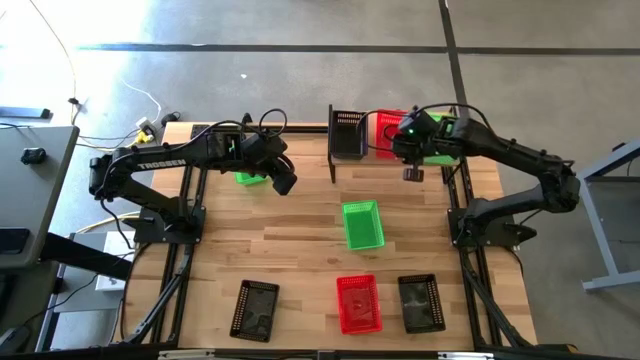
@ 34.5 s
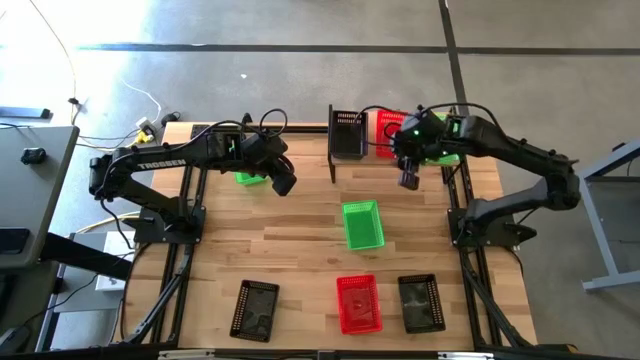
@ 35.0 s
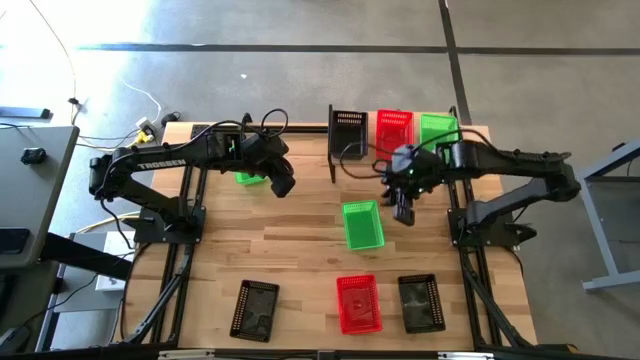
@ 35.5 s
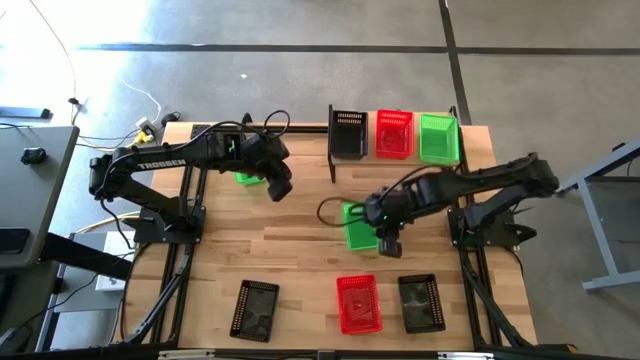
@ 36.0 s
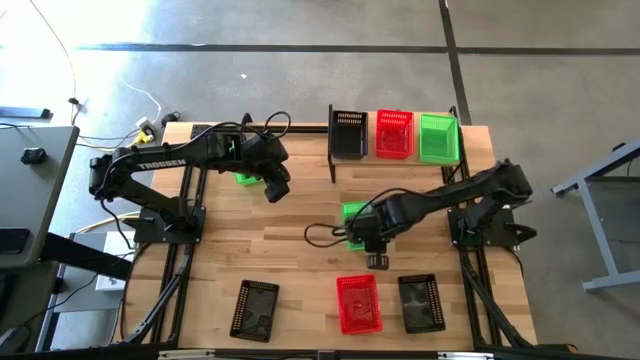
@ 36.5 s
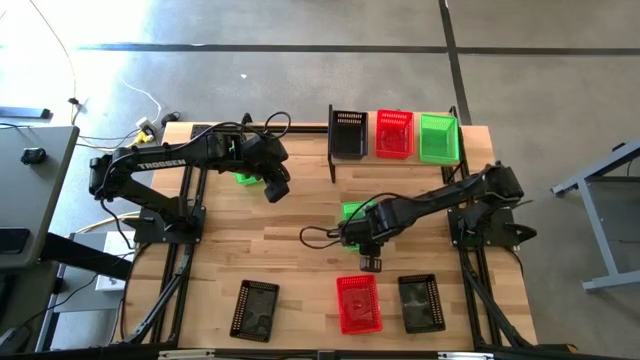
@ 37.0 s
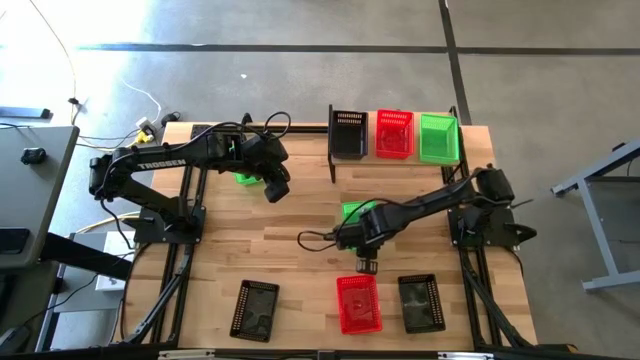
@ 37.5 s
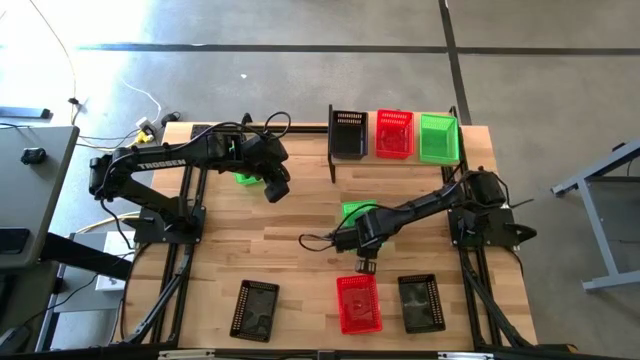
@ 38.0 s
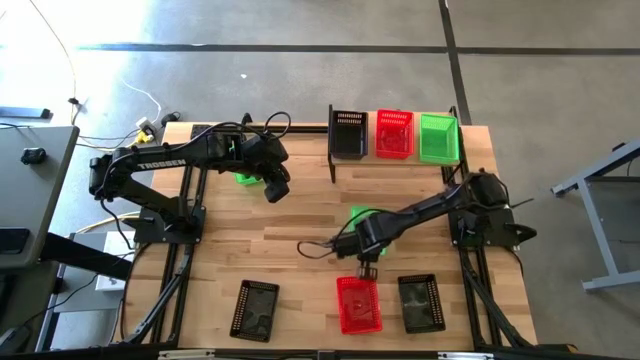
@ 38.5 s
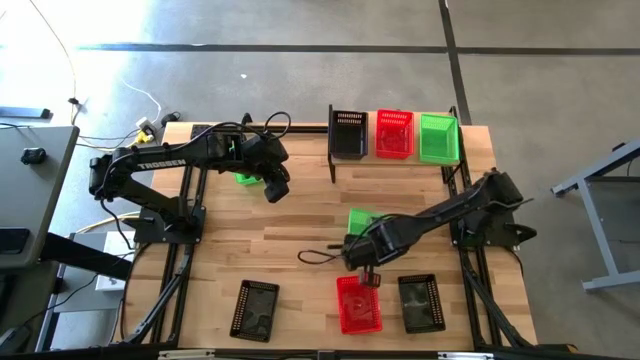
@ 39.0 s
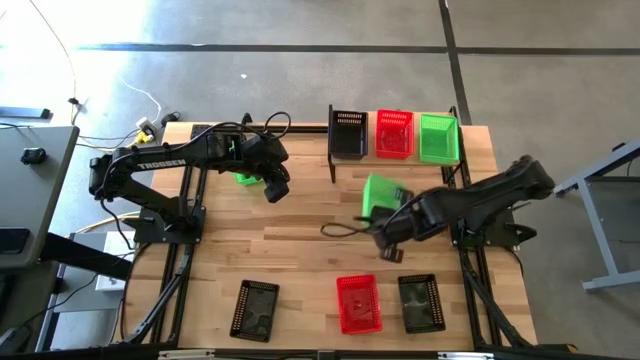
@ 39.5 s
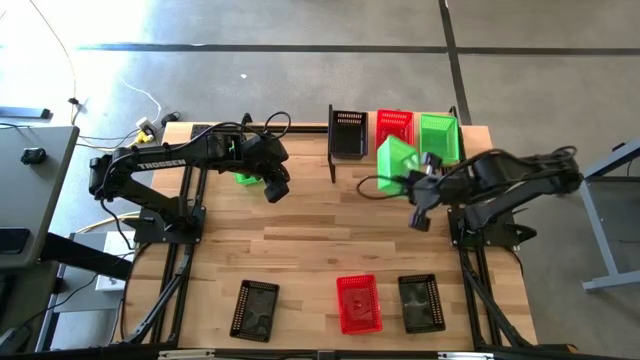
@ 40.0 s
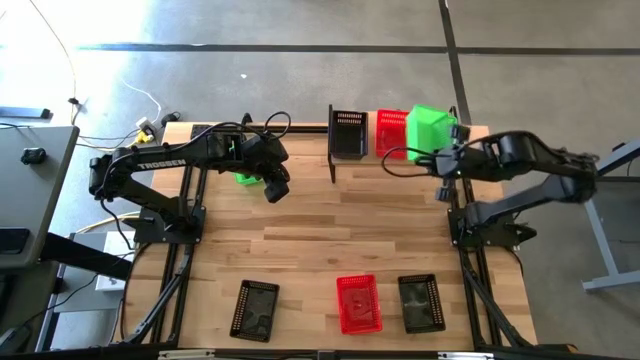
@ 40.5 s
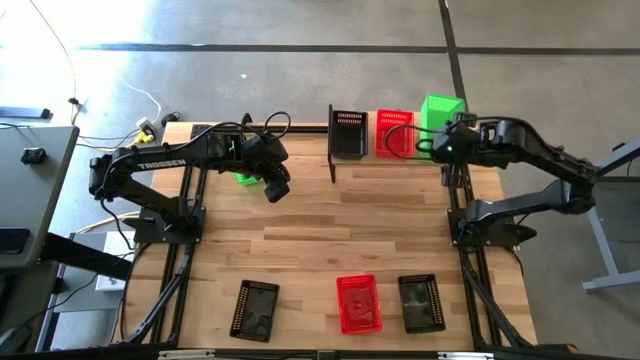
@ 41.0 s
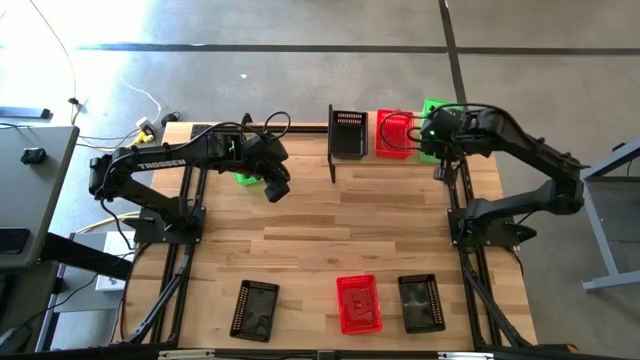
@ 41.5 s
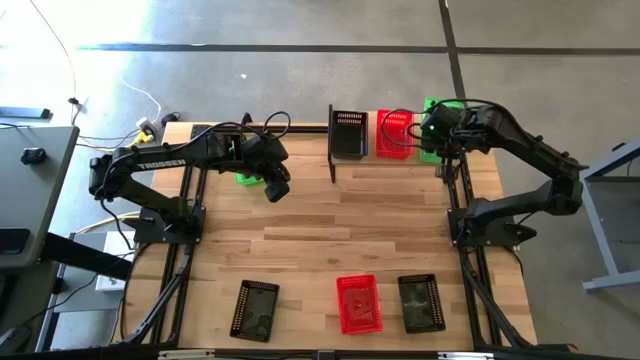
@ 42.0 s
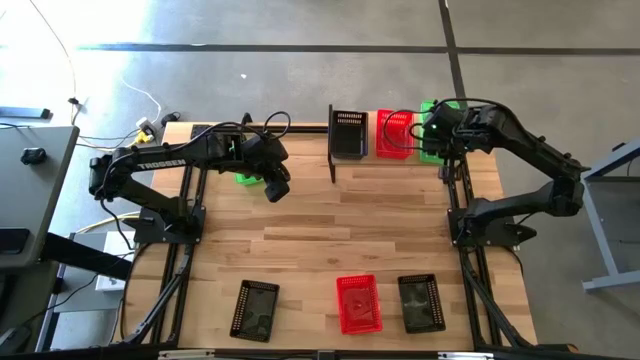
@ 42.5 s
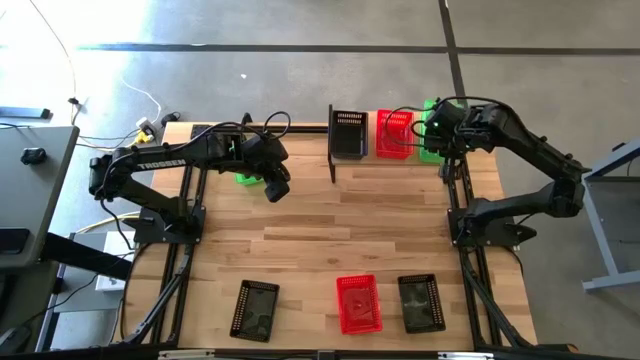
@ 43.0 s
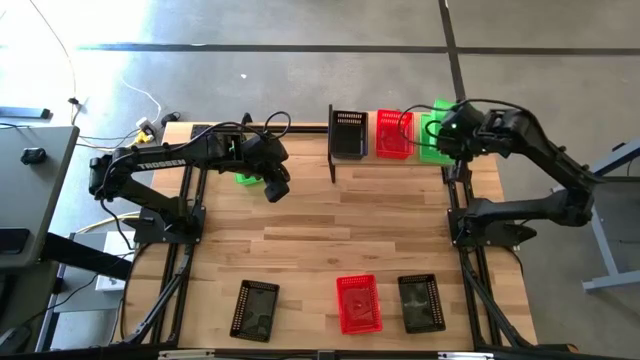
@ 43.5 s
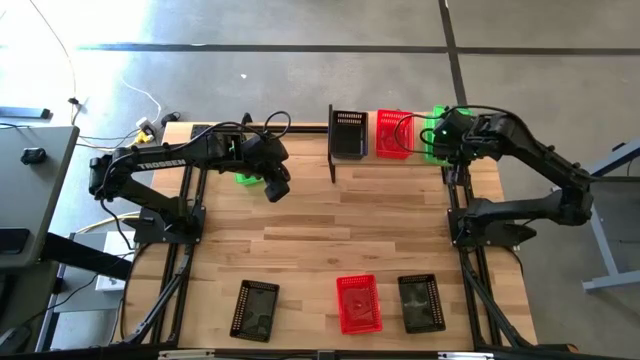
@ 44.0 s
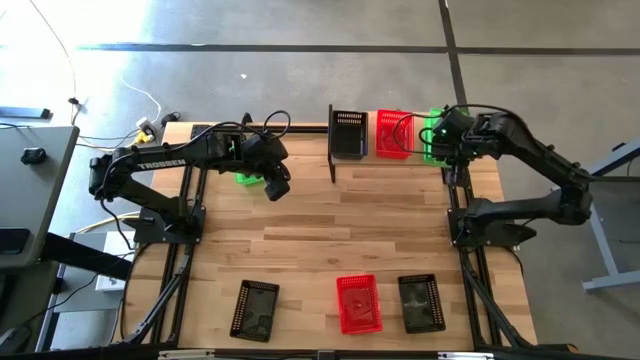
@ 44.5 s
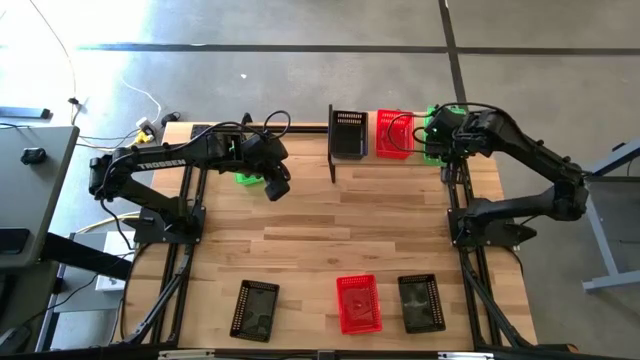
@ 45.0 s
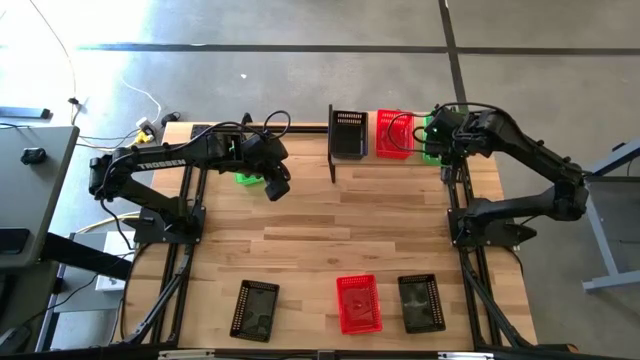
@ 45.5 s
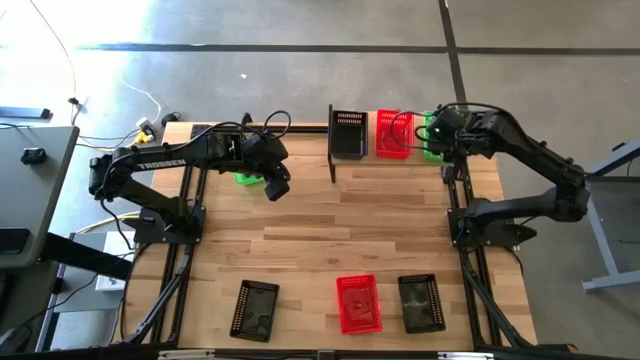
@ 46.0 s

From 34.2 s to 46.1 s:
Task: Stack baskets on shelf by color
Stack the bottom green bin on top of the green bin on the shelf

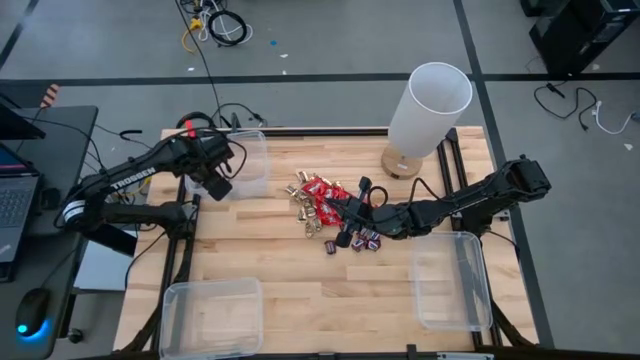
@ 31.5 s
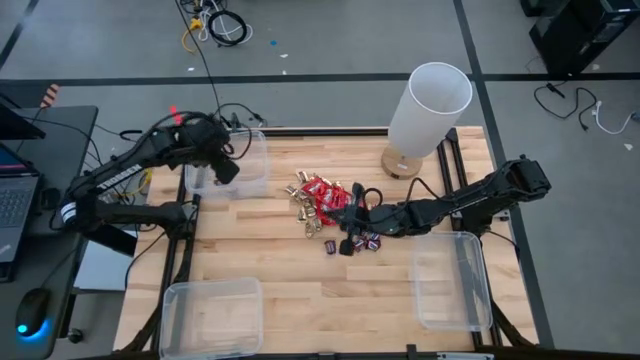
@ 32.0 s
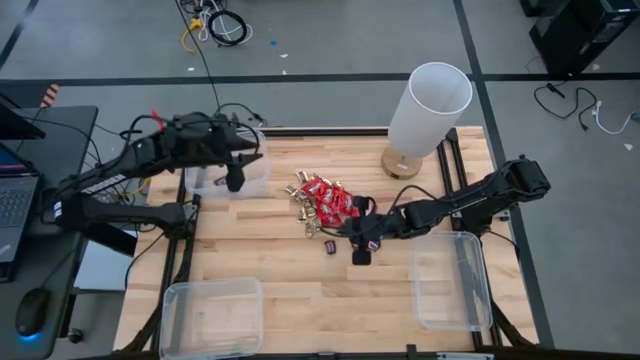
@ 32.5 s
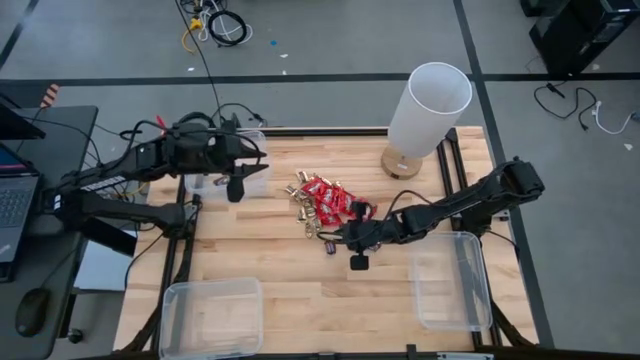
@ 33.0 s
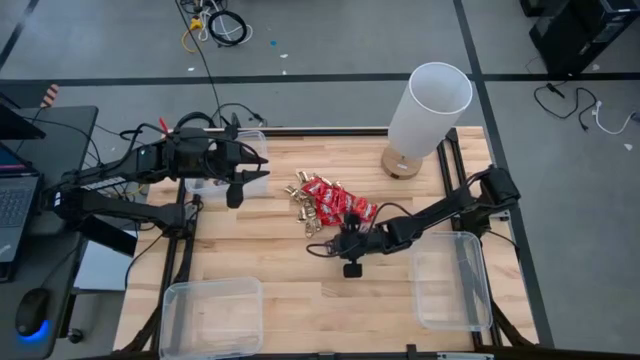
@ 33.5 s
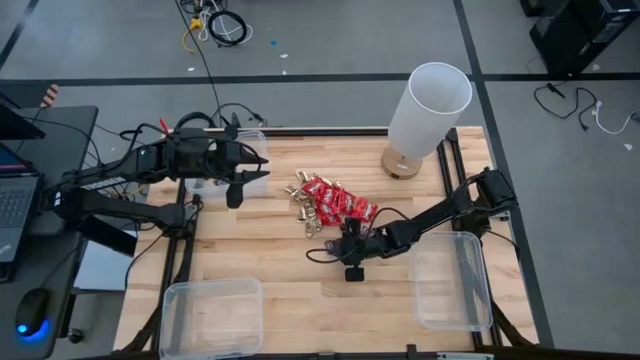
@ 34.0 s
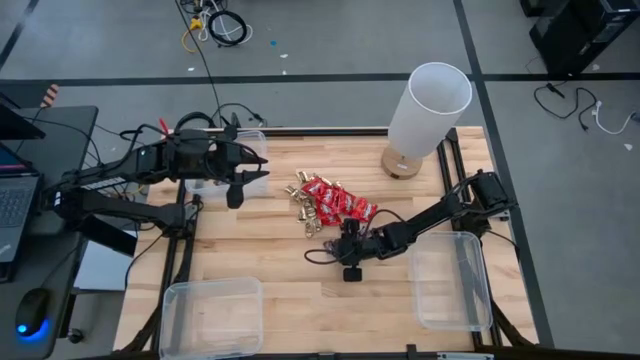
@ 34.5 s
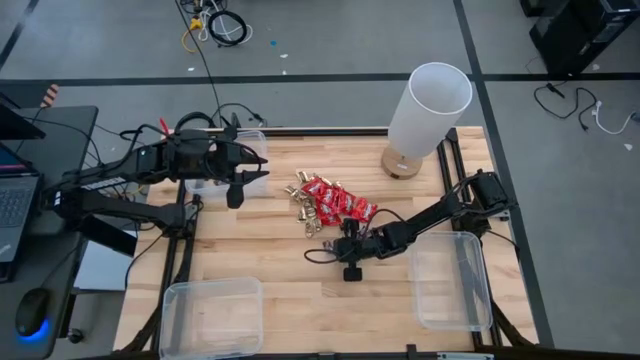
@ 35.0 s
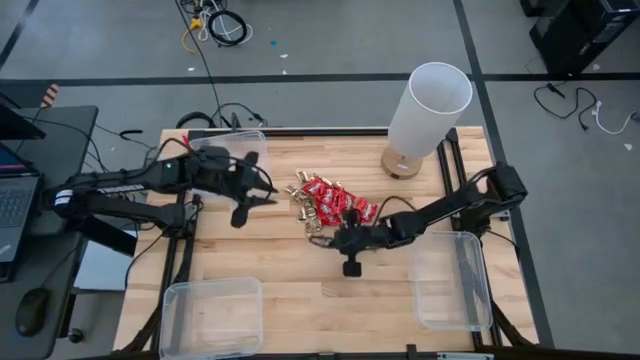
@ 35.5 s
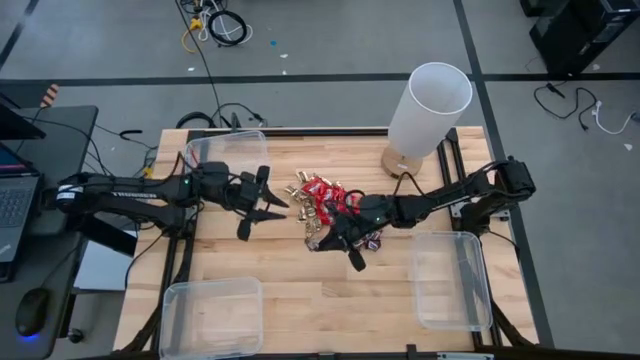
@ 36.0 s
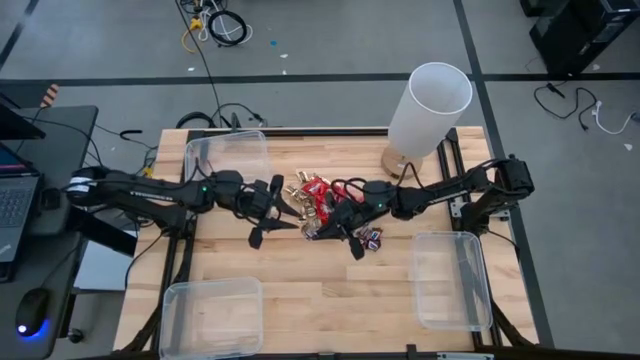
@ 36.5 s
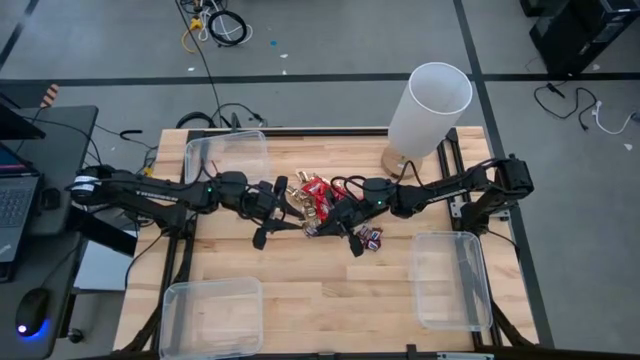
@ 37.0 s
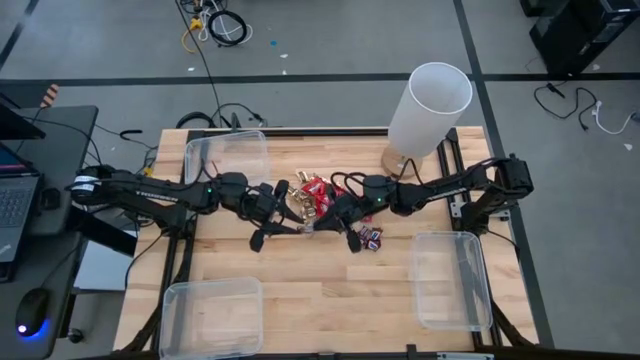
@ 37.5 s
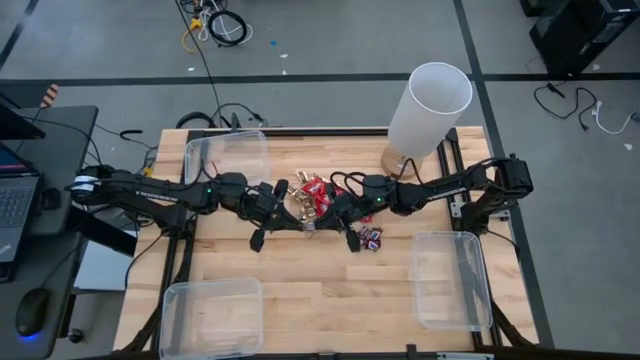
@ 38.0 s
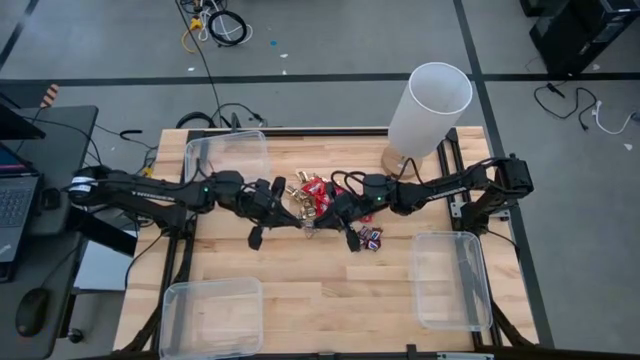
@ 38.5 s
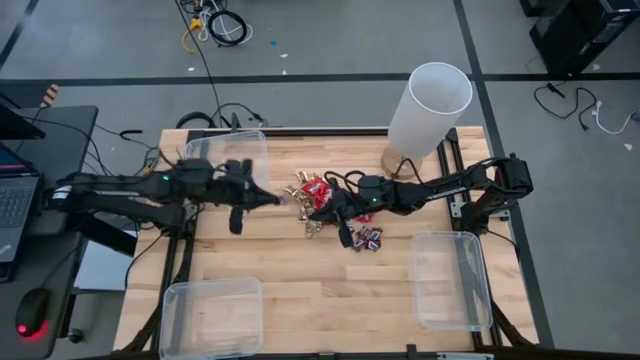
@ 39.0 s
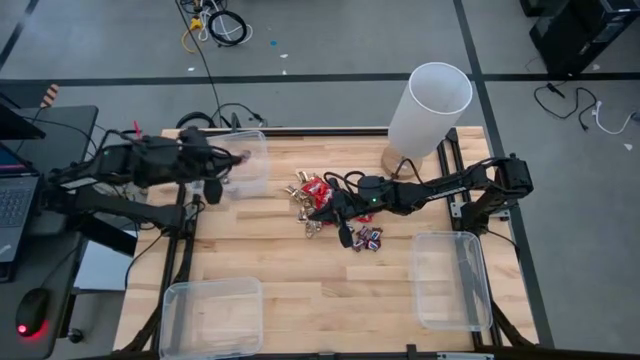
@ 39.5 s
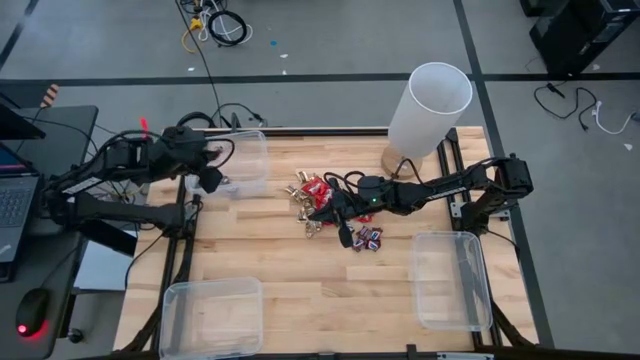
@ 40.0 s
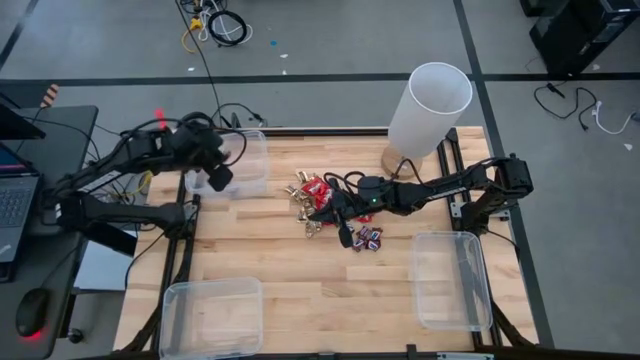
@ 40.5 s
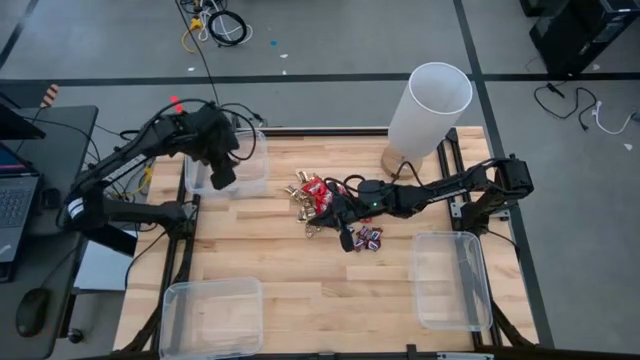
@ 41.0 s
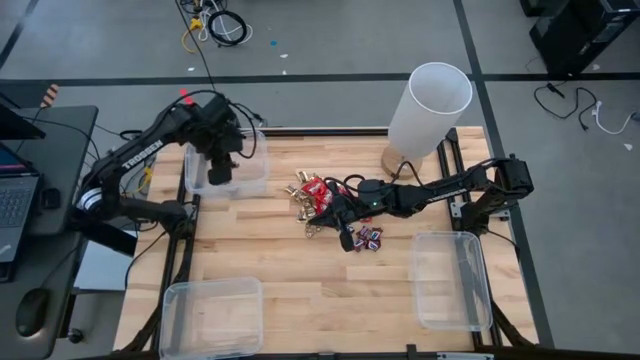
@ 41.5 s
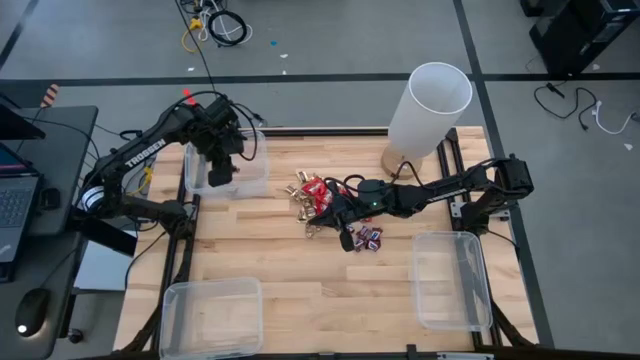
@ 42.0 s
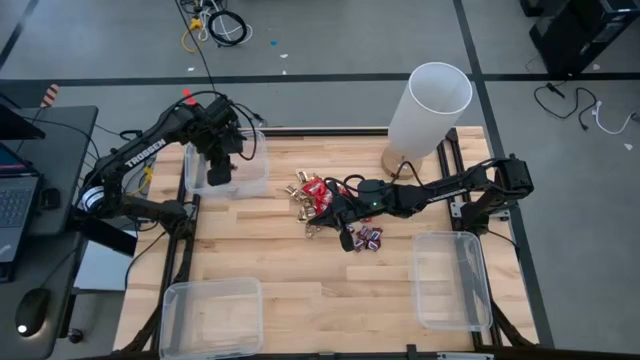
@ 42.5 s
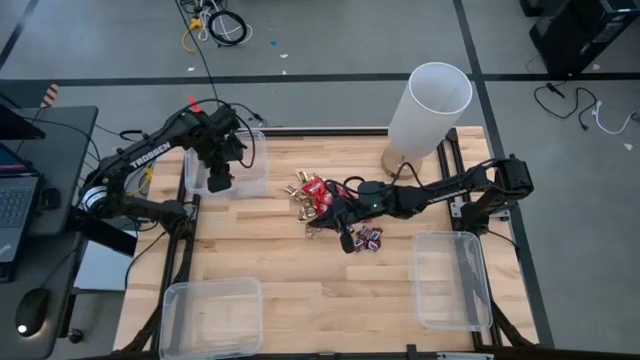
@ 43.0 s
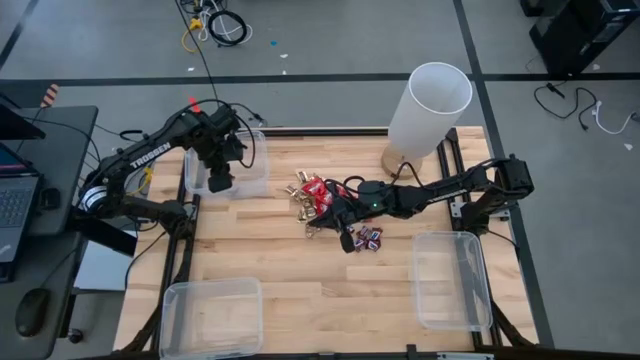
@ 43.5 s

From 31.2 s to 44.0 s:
Task: Sort candy
Put the brown chocolate into the top left transparent bin
